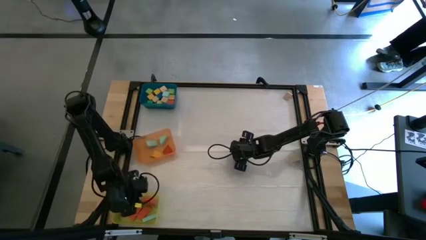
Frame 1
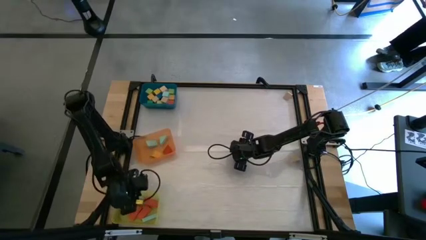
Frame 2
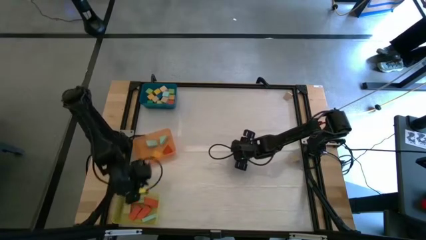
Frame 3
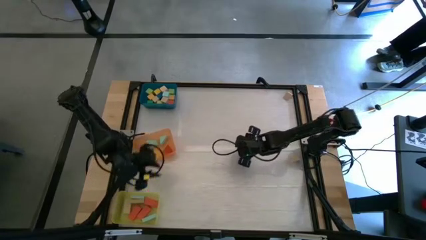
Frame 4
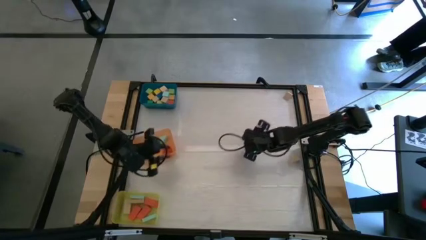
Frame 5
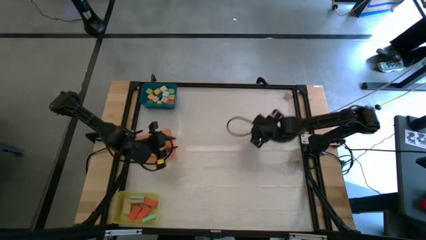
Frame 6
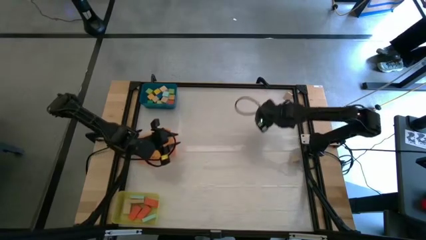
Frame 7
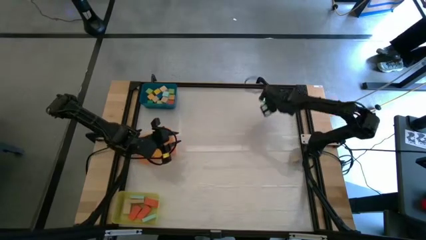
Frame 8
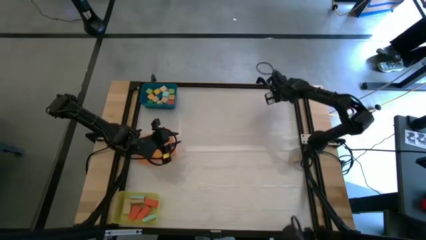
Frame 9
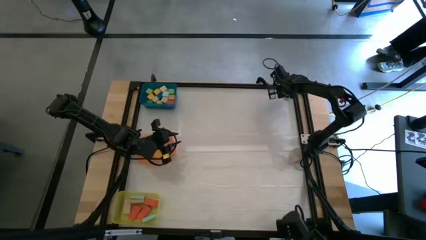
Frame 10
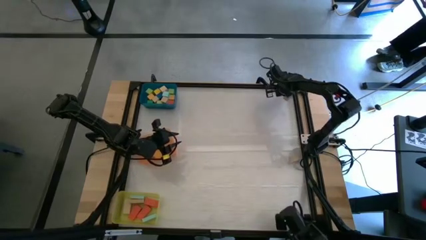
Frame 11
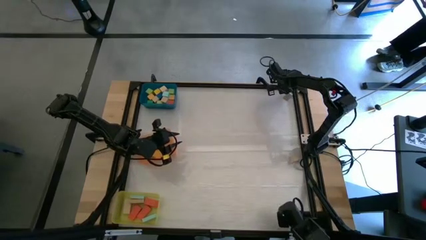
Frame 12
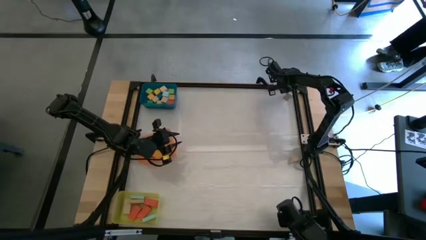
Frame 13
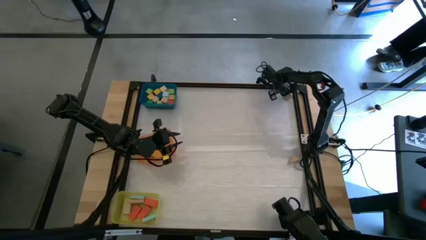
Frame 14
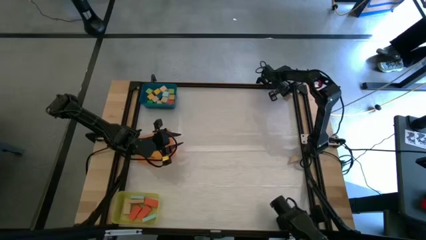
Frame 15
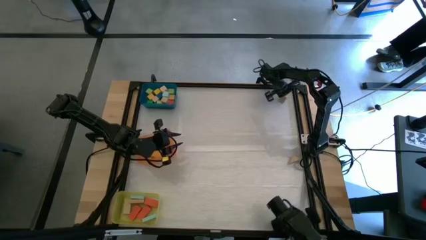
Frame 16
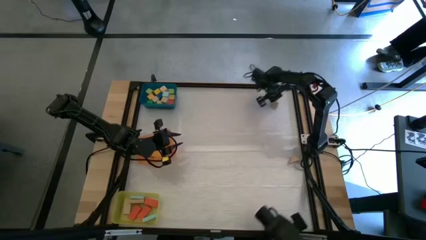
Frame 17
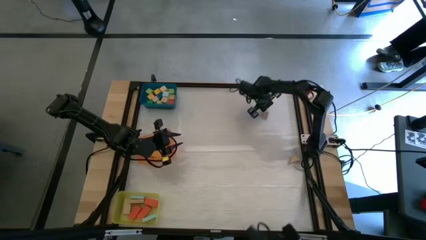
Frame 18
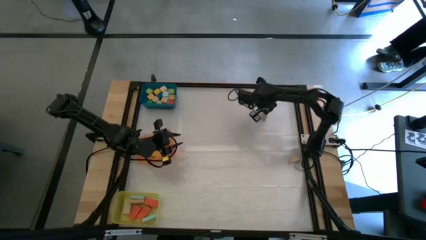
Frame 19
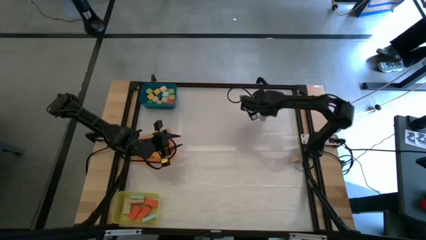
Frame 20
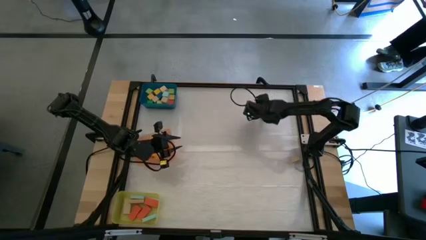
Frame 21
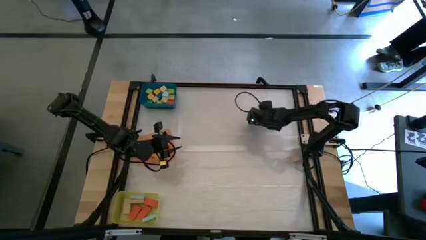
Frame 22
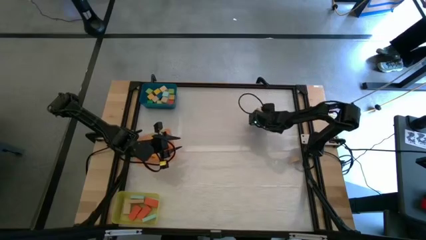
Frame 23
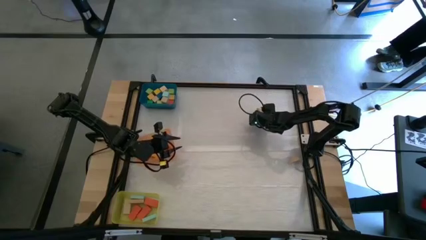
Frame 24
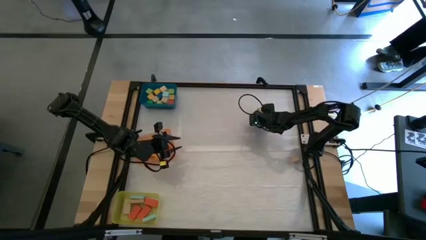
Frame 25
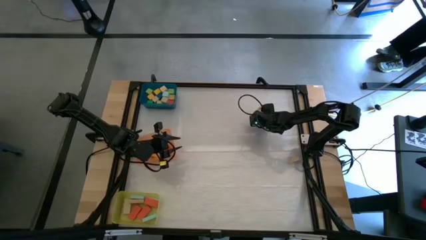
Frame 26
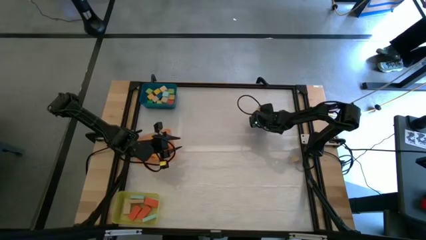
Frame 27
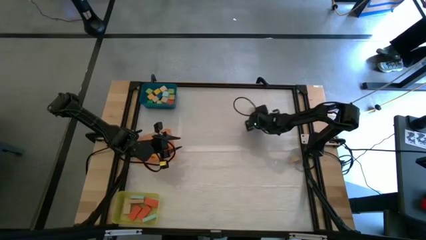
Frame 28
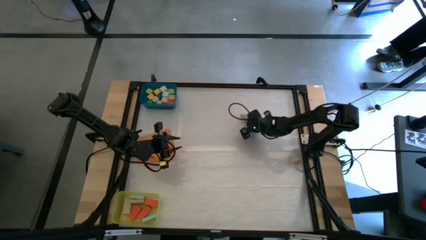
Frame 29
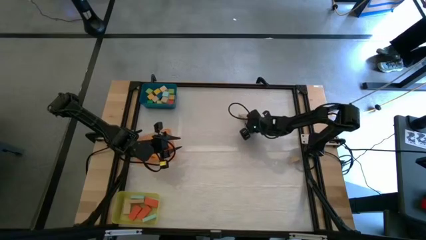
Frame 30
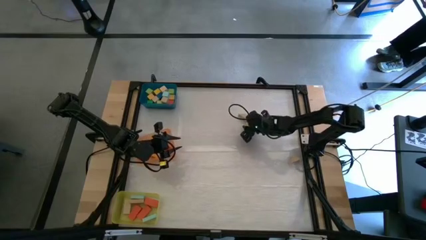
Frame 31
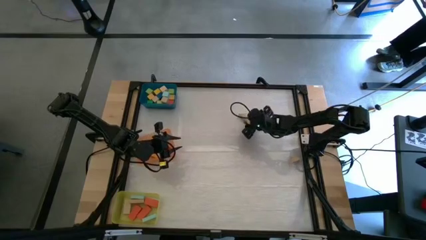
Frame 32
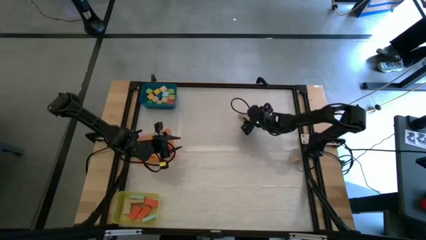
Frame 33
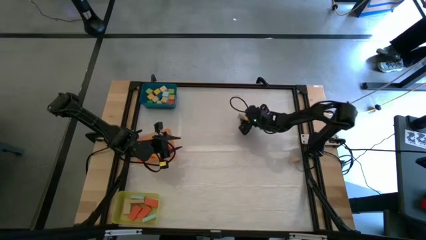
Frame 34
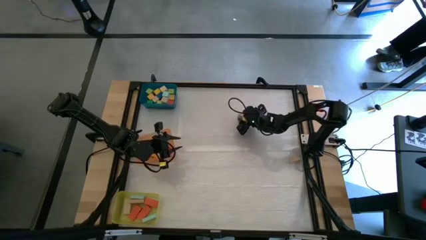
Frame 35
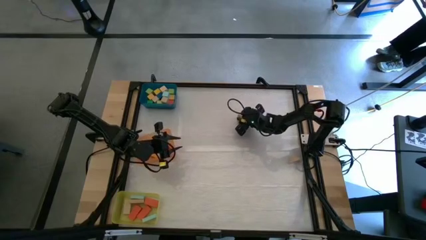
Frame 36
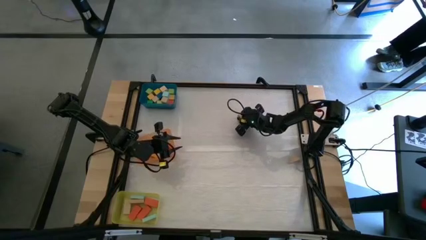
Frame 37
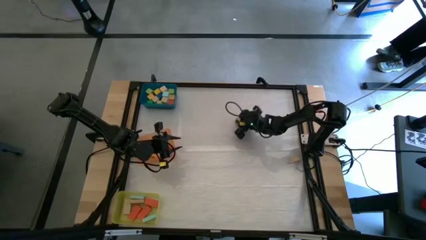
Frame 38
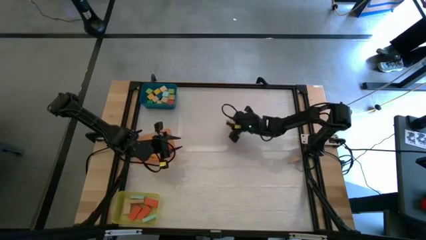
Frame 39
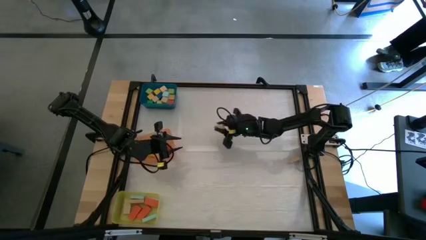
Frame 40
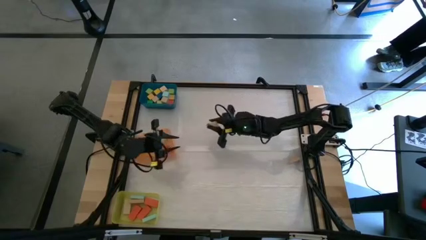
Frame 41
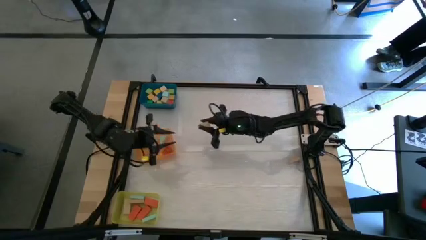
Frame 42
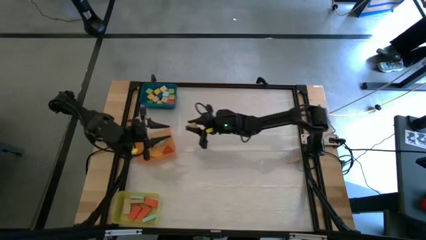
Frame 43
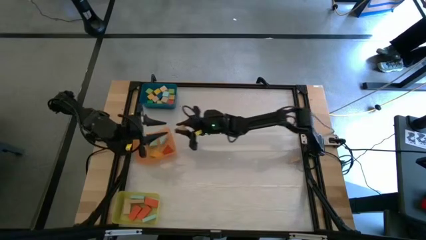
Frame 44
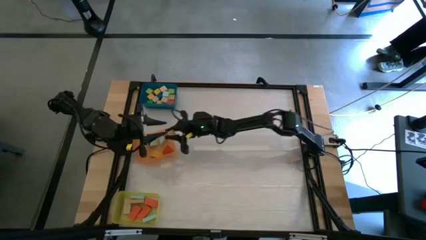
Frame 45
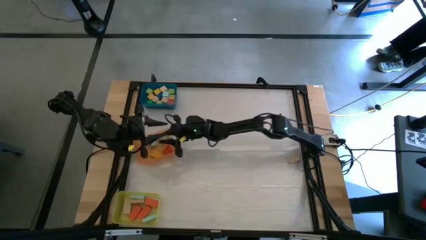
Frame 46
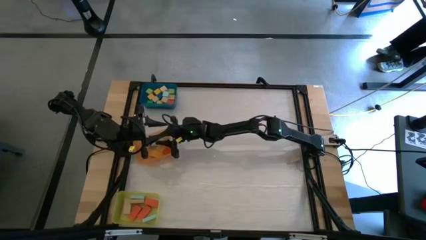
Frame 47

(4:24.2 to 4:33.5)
Task: Sort blocks by size
Put the light brown triangular block into the orange bin

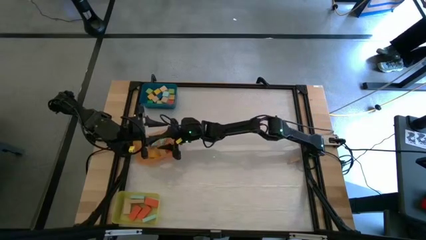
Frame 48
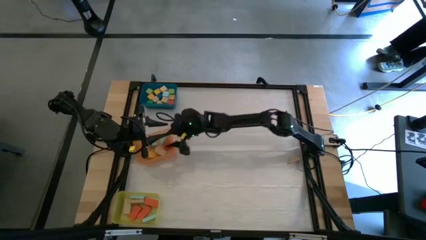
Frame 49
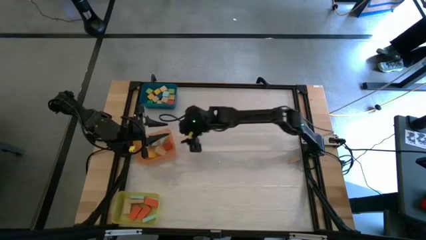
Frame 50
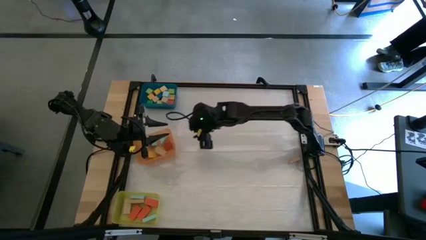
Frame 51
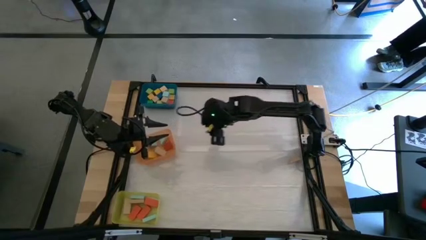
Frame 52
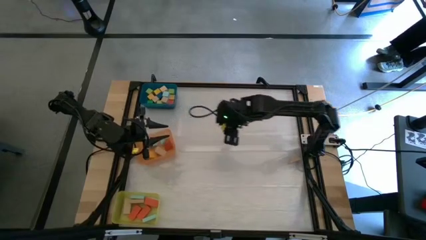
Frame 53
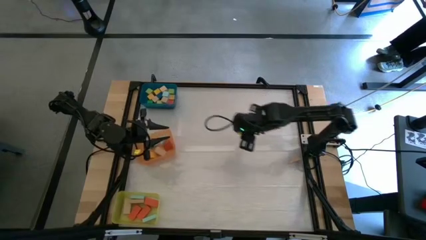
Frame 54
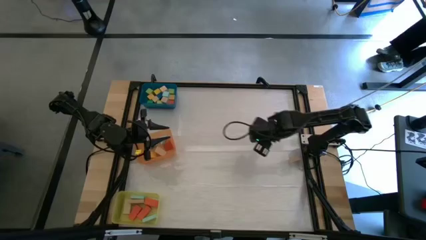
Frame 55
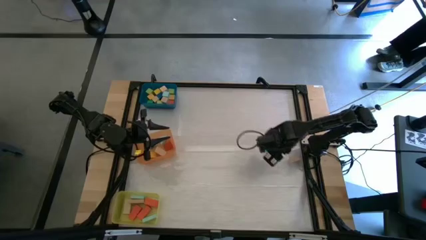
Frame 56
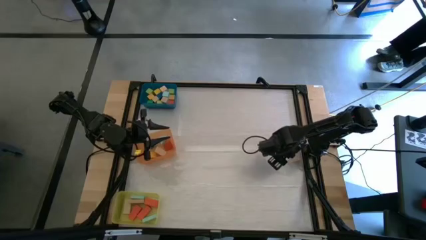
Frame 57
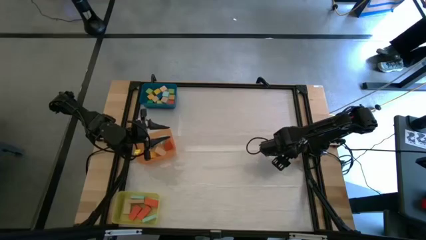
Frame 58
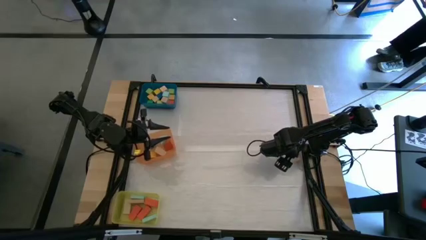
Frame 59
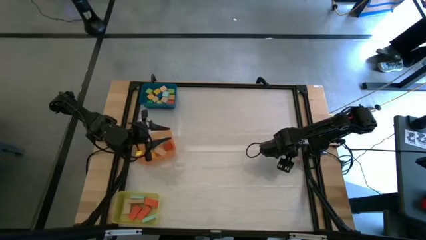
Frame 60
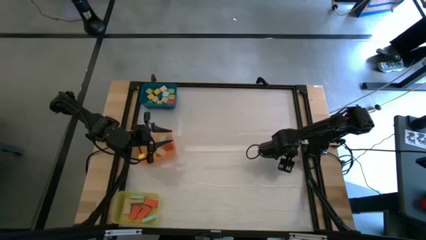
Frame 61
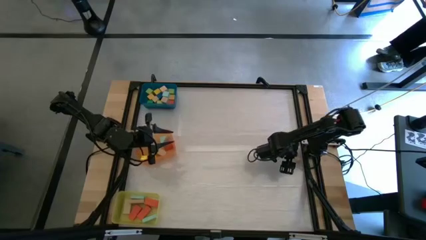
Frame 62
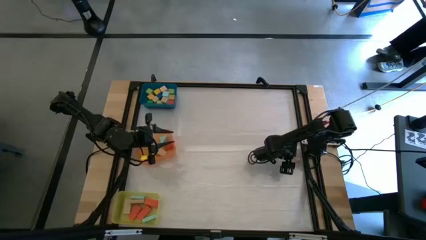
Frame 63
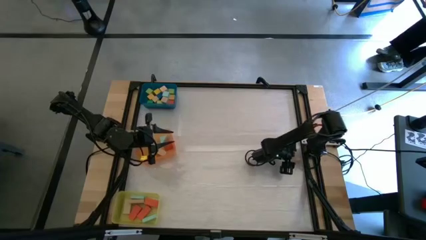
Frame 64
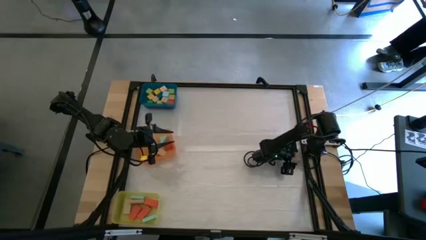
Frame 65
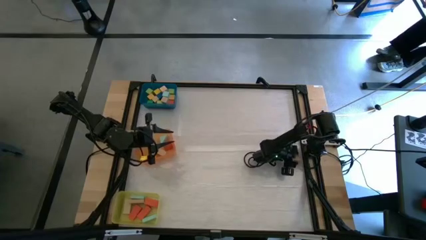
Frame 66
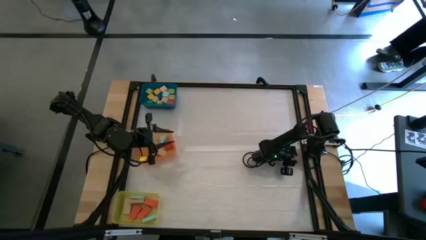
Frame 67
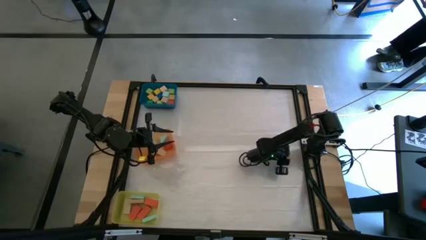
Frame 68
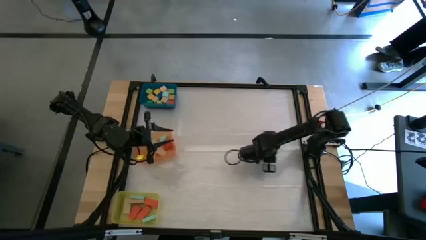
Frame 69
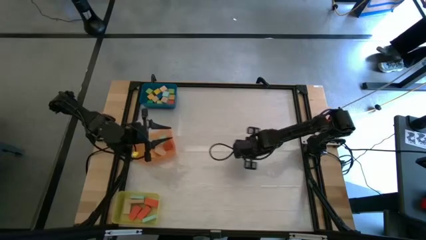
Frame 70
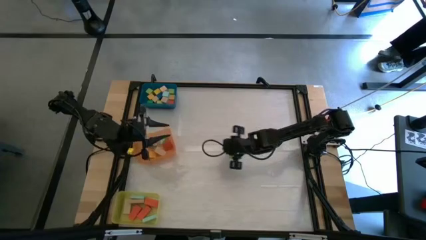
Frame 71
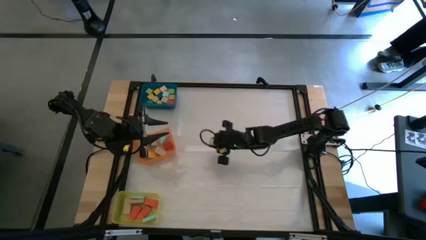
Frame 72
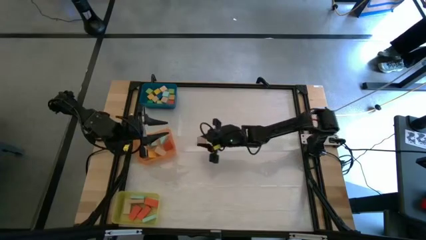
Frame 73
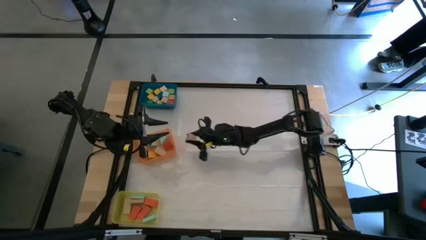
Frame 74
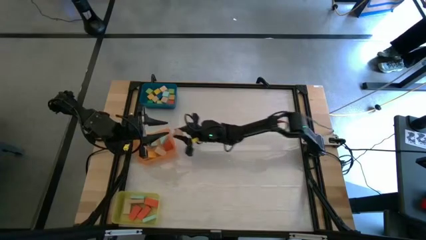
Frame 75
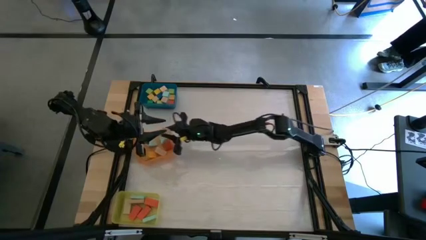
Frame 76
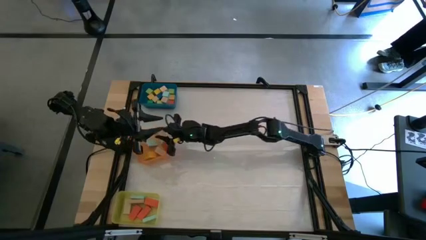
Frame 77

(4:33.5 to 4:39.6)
Put the light brown triangular block into the orange bin
